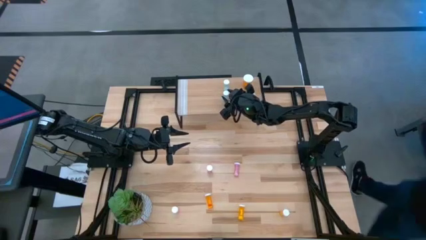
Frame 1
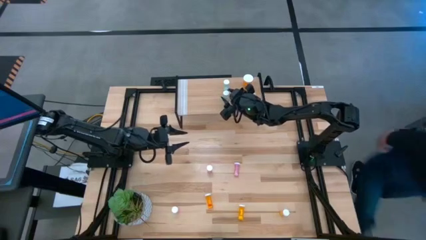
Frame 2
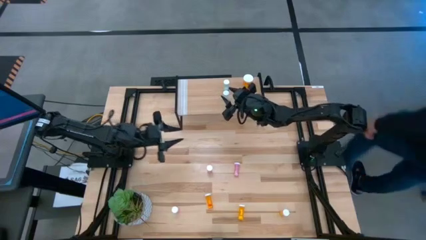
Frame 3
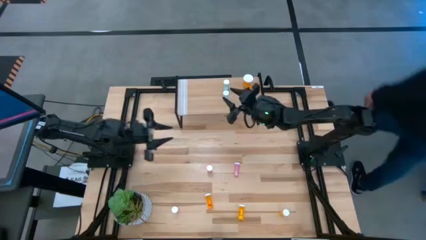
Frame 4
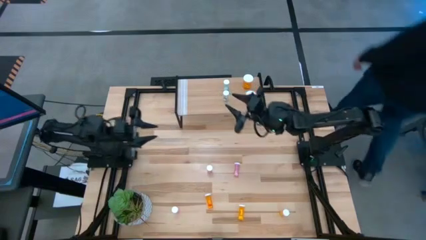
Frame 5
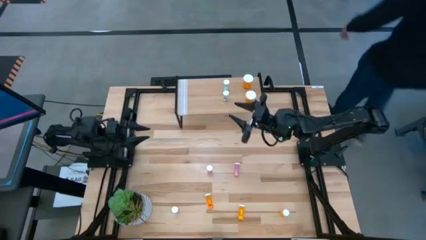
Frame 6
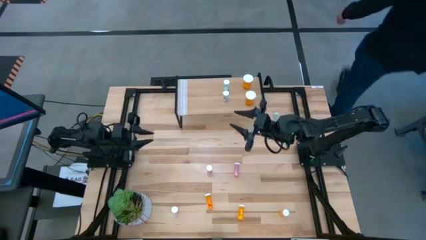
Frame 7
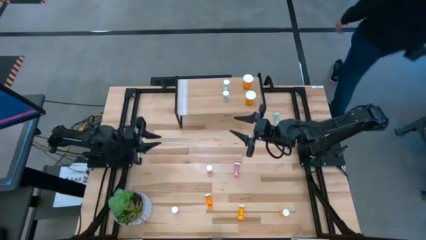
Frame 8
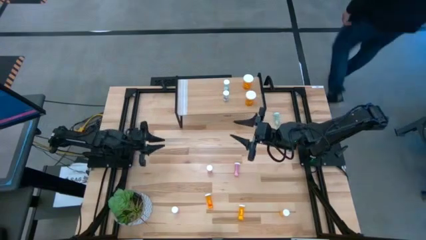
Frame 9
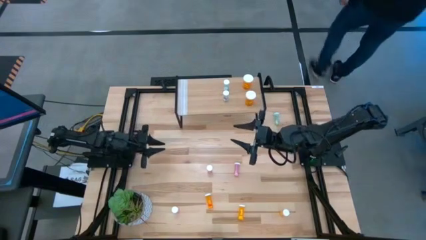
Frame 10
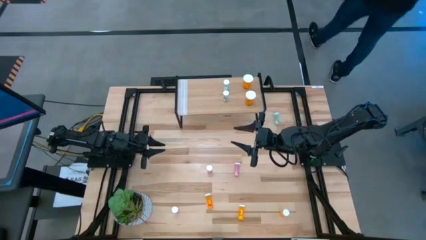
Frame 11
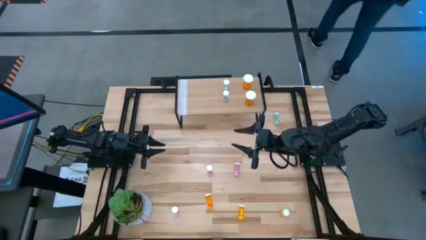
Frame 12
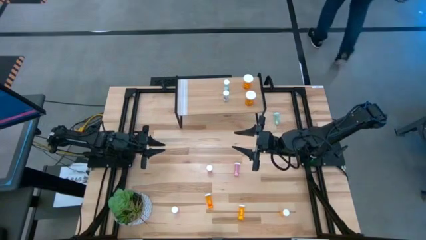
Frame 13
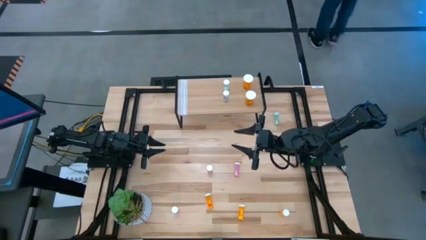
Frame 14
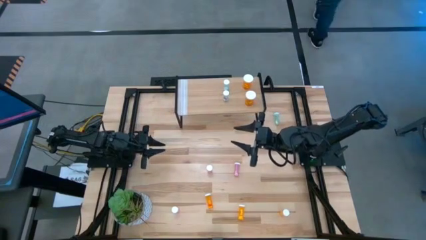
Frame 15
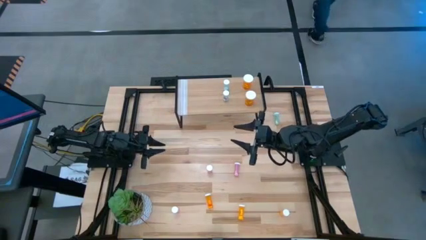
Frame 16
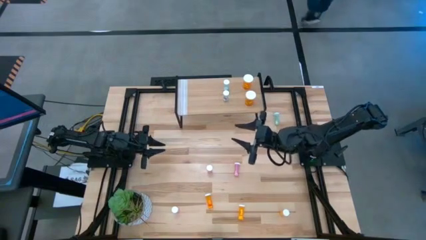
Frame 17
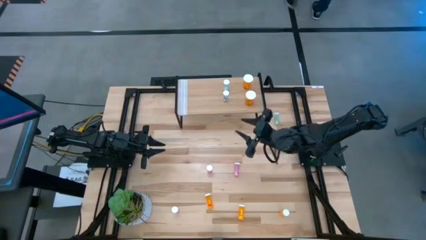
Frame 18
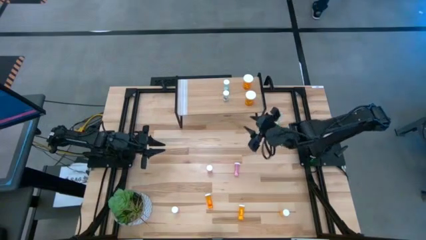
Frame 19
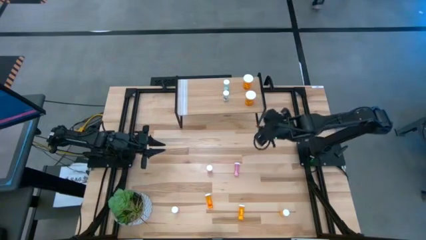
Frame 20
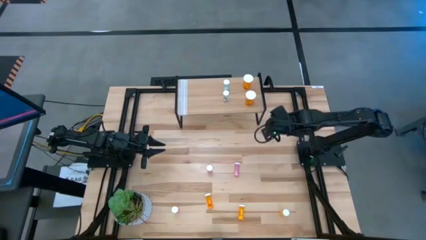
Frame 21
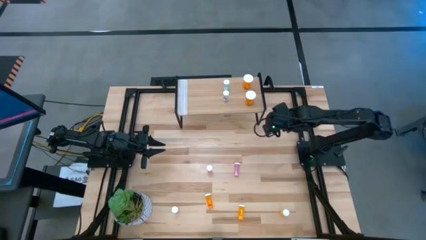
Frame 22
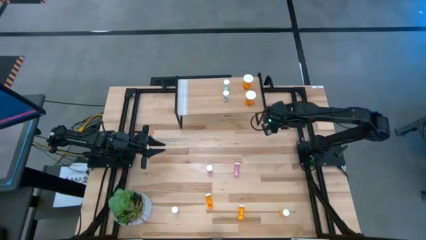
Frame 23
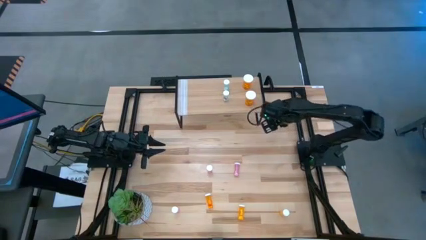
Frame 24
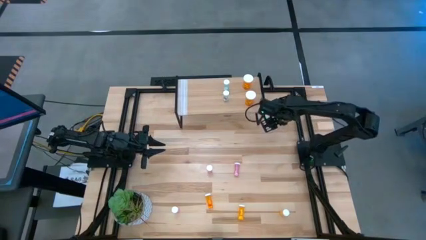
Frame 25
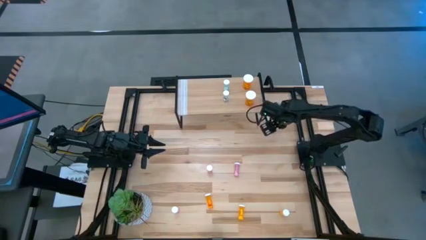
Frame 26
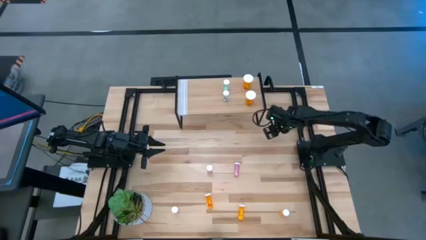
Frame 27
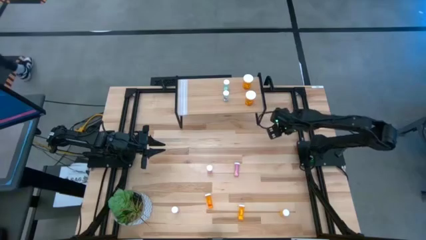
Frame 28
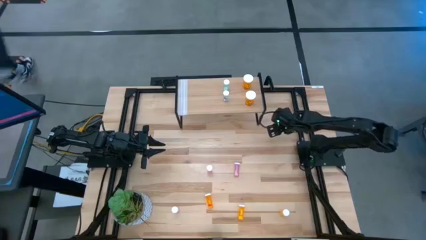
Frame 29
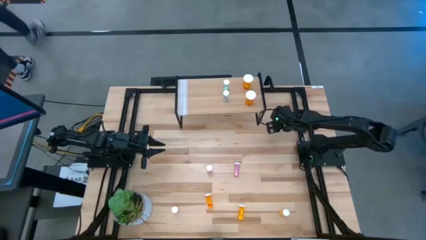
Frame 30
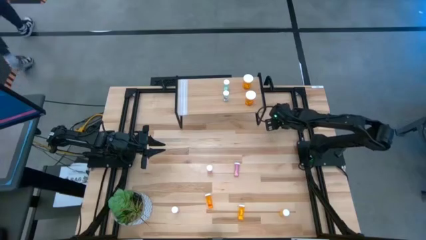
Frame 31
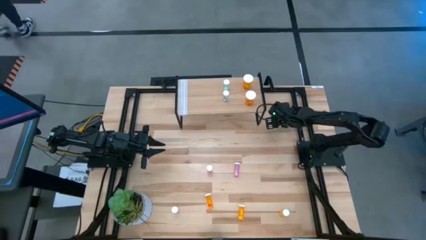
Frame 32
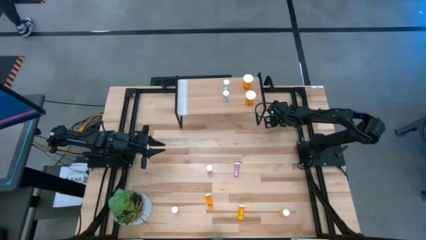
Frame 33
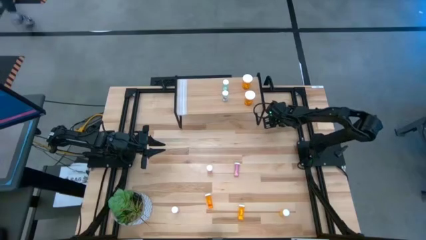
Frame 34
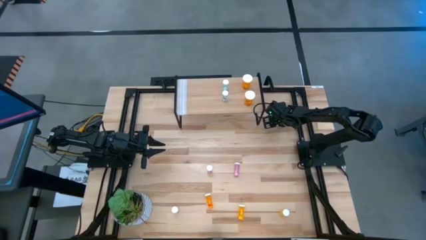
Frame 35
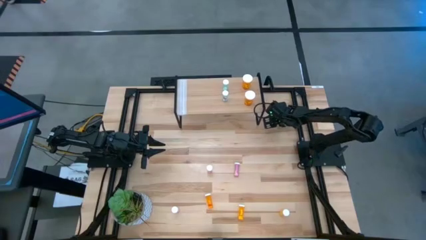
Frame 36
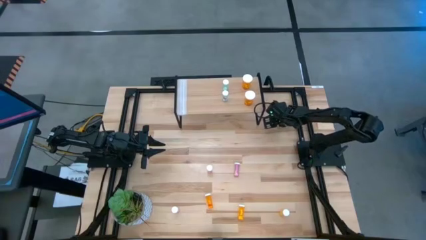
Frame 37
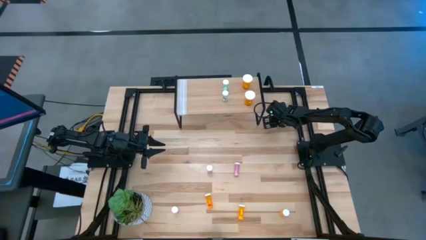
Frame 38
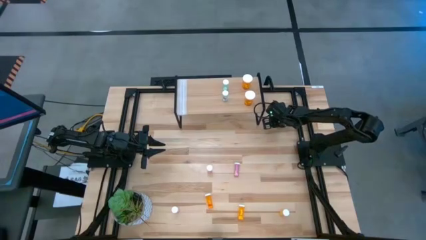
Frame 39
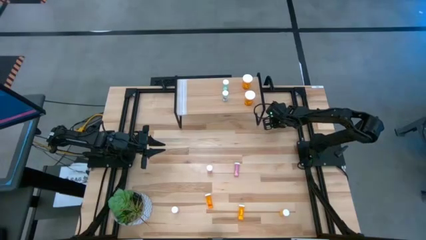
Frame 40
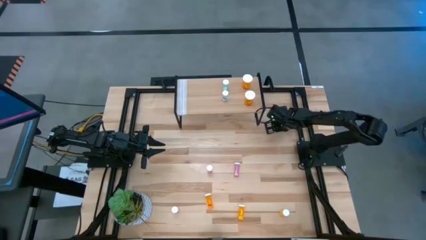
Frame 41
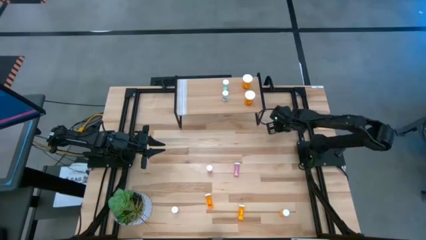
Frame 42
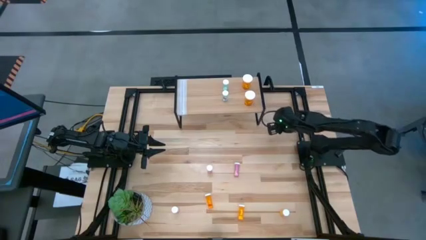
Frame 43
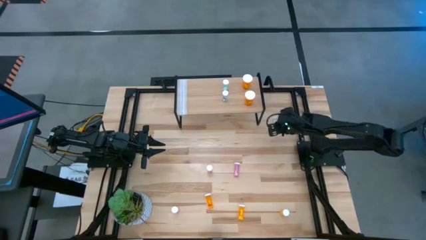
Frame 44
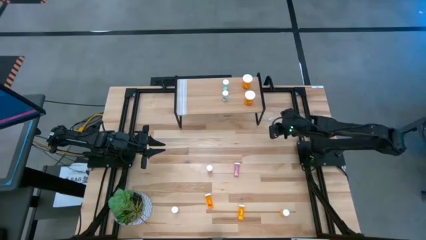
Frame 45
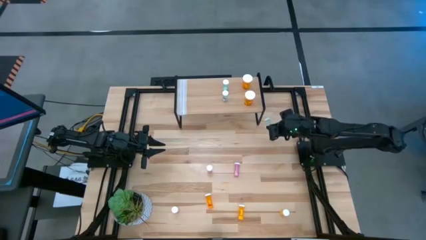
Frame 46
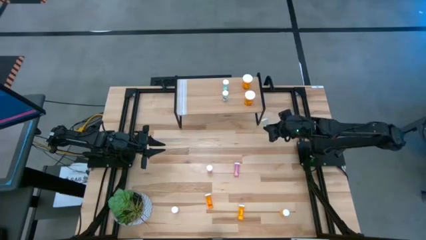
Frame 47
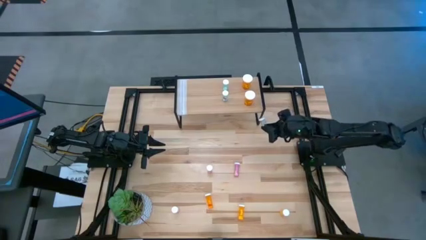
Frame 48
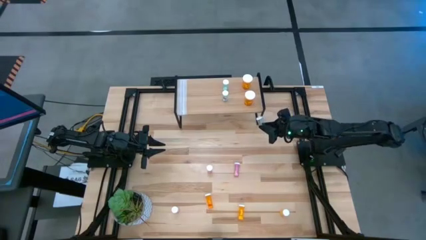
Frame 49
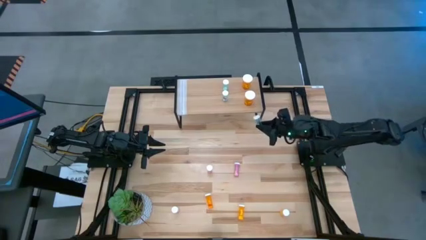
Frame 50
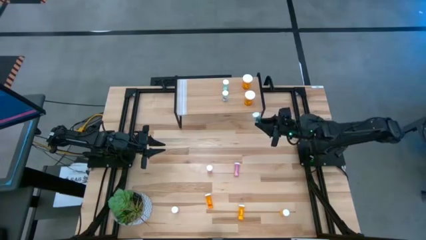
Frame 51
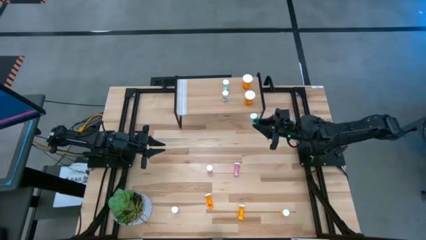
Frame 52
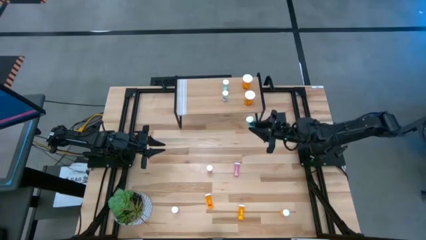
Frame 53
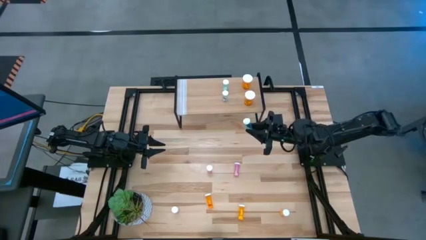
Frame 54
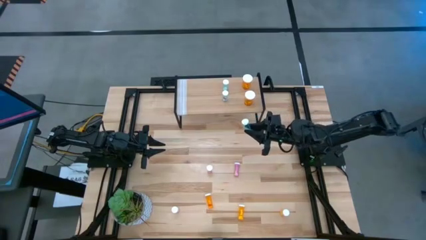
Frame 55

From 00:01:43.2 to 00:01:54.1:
Task: Pick and place medicine bottles onto shelf by color
Put the small blue pill bottle on the shelf aligned with the other small blue pill bottles

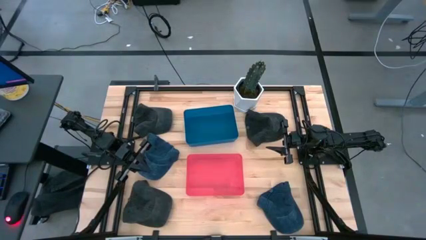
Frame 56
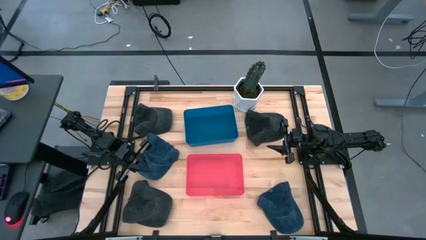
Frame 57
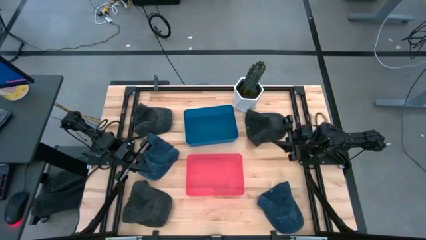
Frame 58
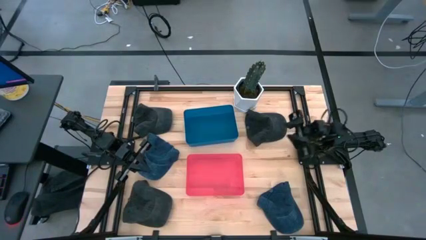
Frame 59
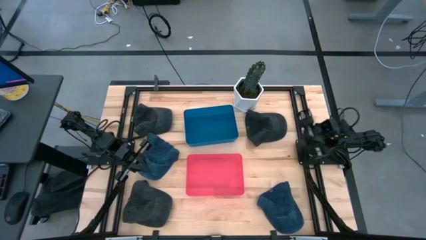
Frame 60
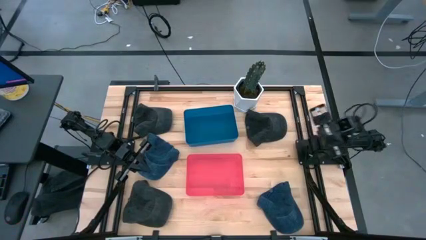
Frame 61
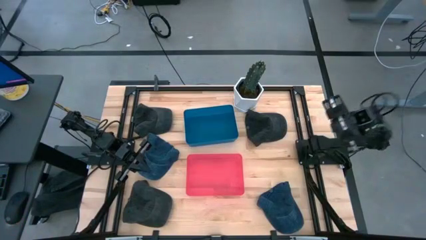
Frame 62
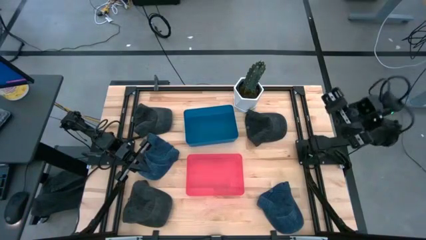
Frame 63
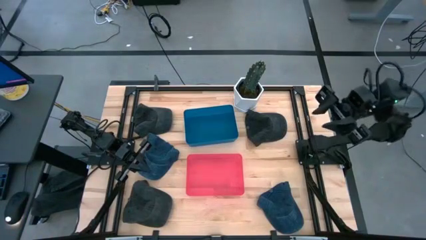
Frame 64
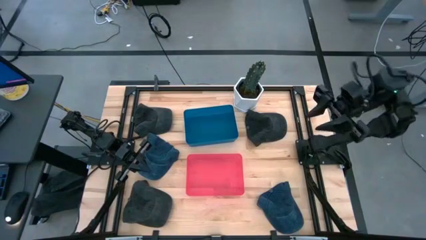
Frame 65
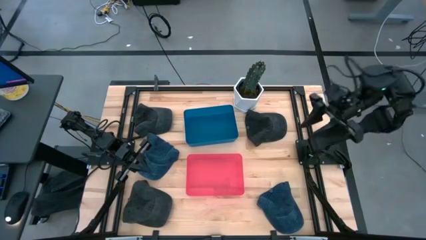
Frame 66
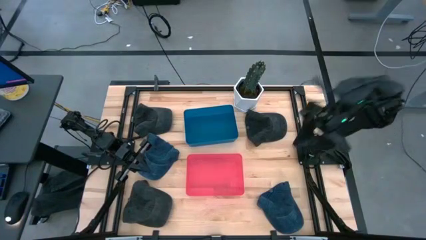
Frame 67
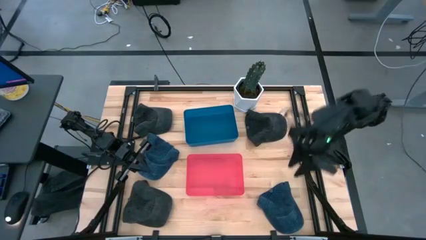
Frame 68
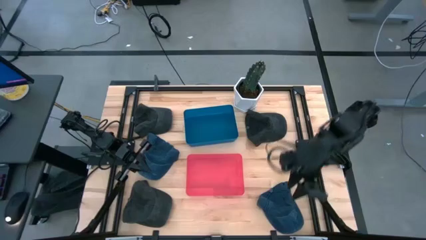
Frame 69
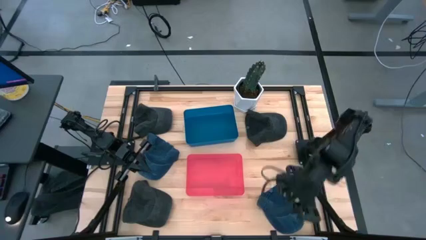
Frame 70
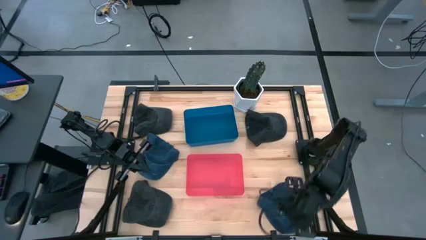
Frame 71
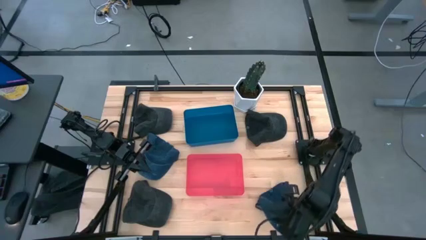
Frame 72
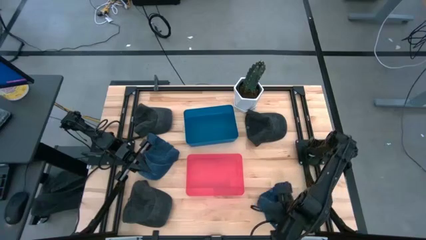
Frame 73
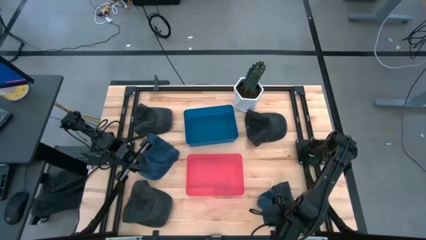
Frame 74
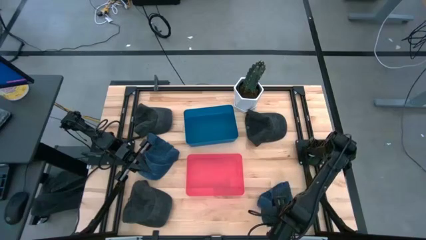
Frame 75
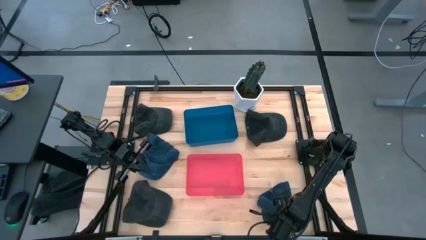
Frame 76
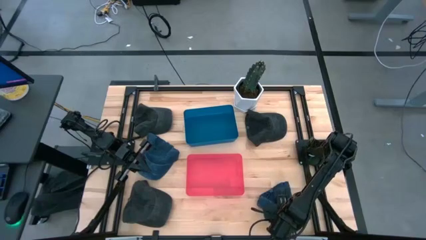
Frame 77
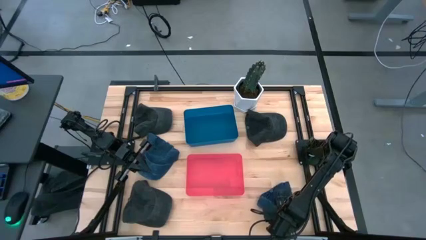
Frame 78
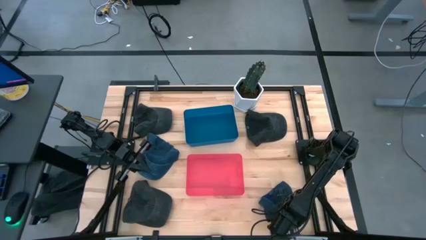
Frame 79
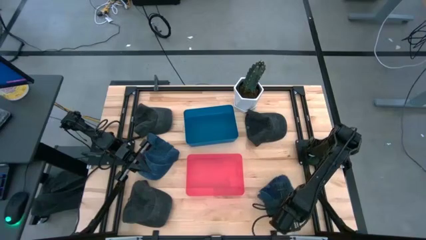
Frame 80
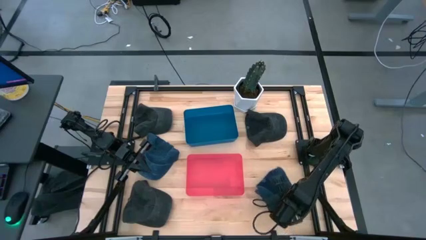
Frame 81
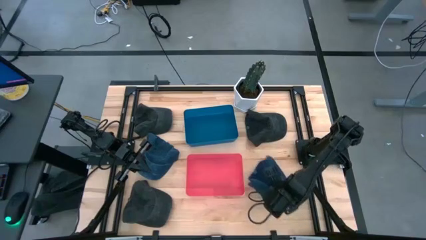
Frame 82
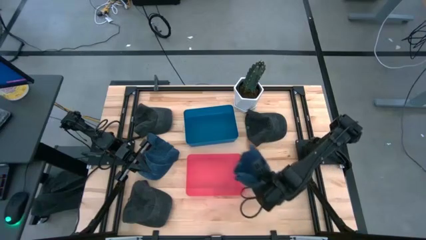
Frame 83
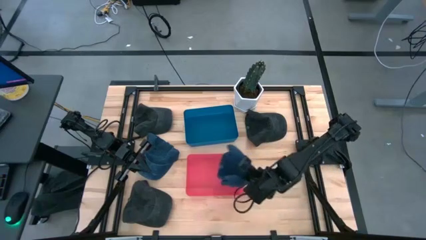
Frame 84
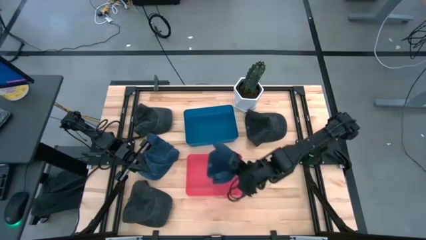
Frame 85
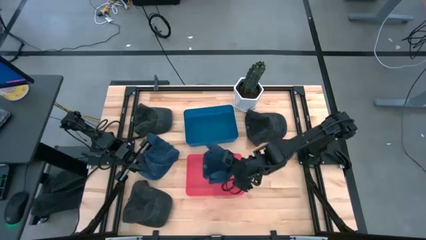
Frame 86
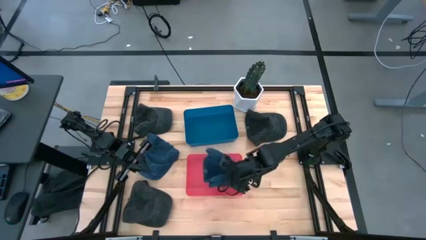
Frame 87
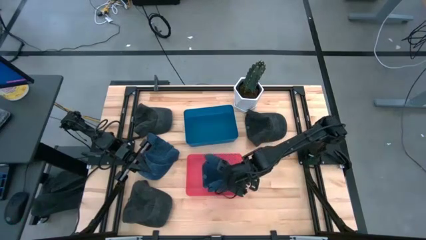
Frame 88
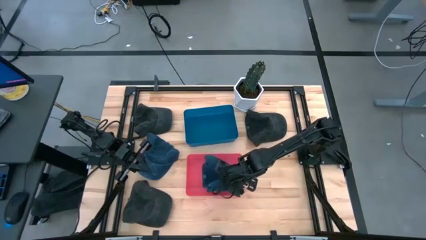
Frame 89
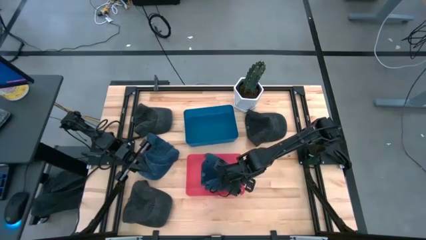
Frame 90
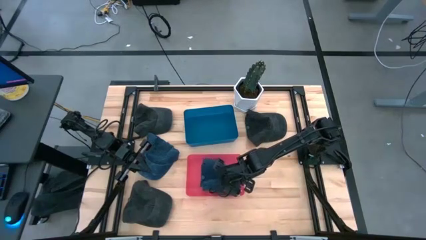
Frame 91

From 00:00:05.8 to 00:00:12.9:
Task: Pick & Place hat
Put the right blue cap into the red bin
